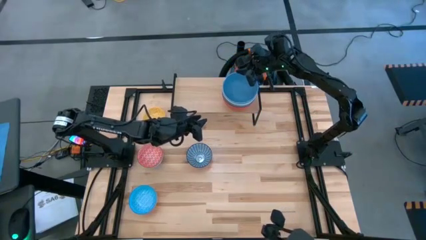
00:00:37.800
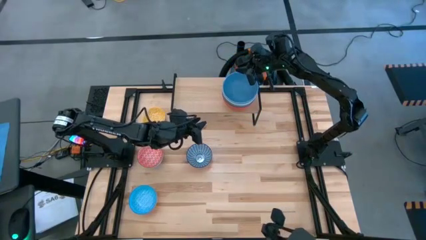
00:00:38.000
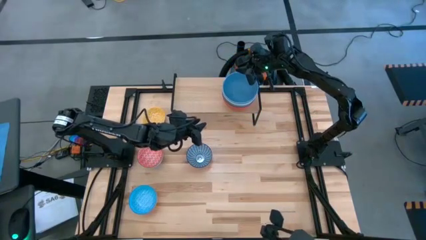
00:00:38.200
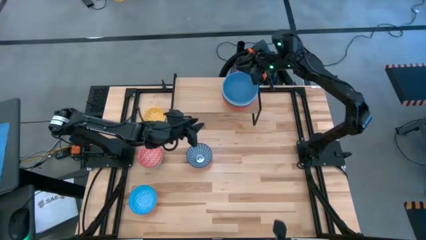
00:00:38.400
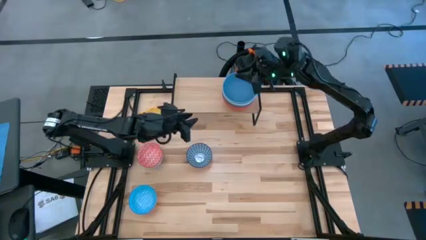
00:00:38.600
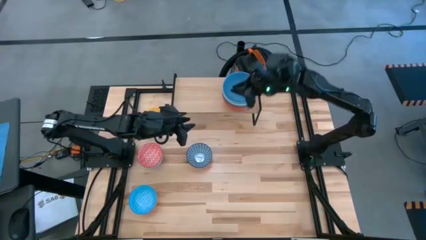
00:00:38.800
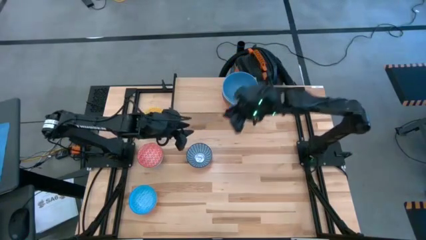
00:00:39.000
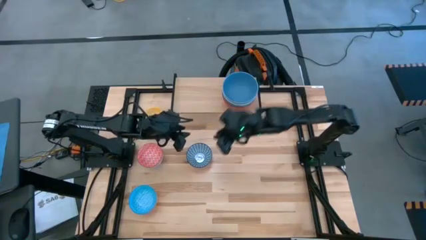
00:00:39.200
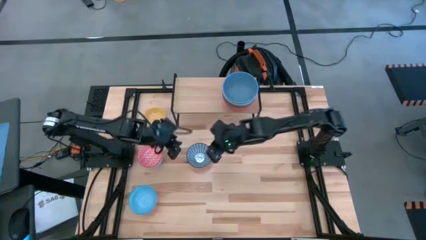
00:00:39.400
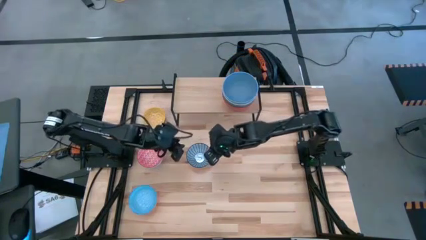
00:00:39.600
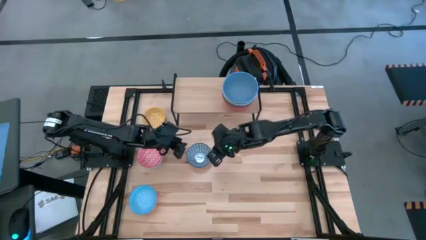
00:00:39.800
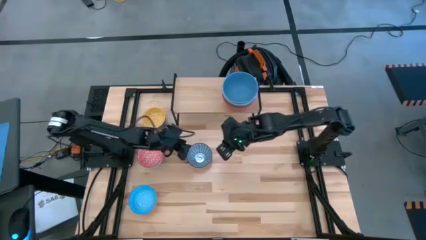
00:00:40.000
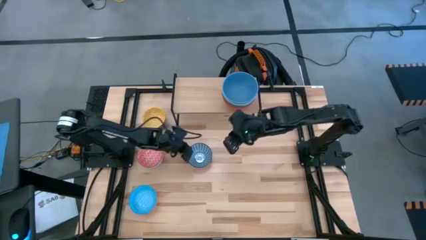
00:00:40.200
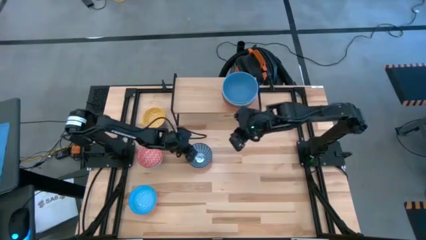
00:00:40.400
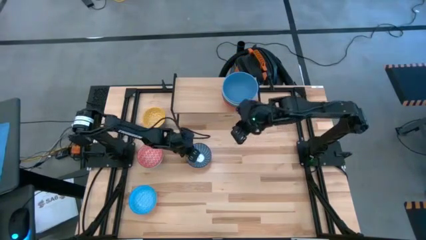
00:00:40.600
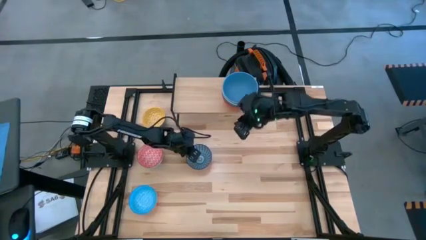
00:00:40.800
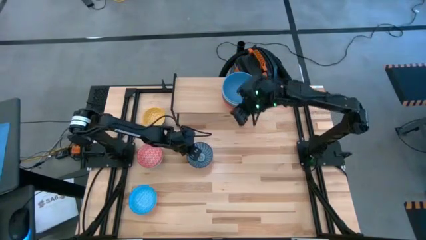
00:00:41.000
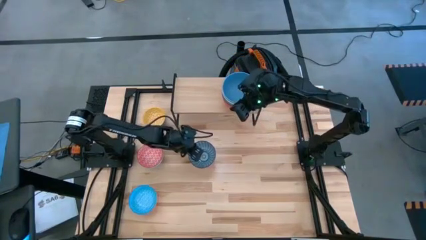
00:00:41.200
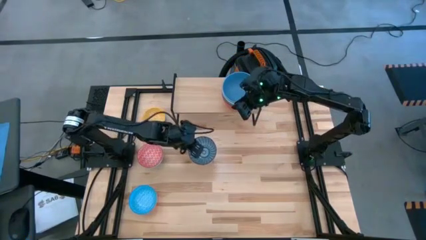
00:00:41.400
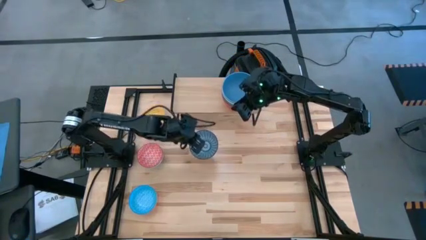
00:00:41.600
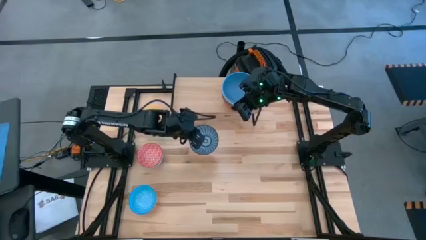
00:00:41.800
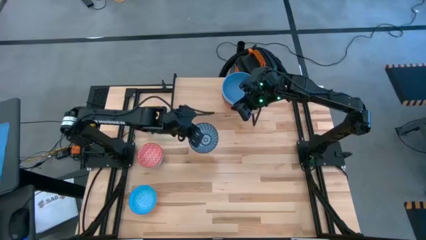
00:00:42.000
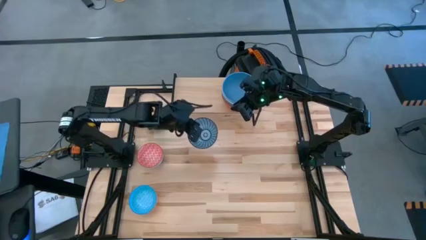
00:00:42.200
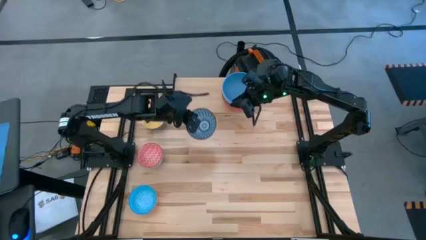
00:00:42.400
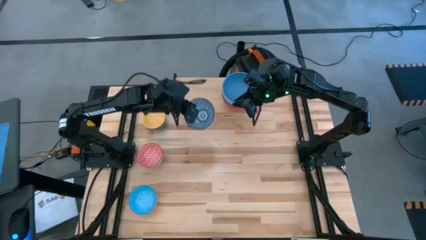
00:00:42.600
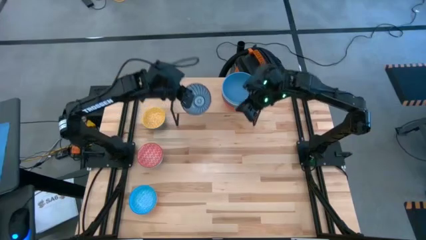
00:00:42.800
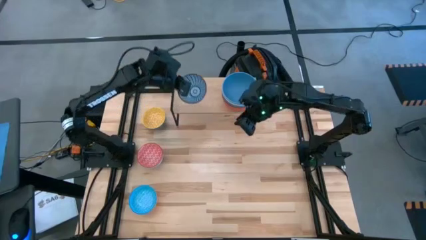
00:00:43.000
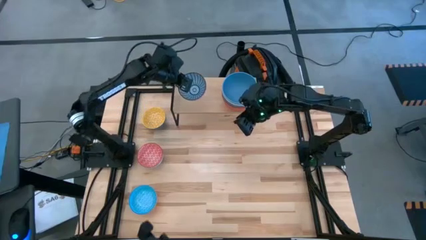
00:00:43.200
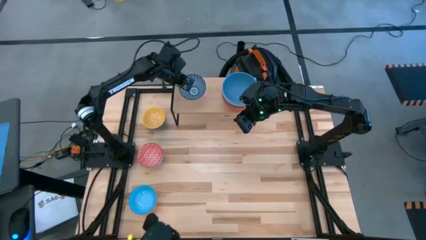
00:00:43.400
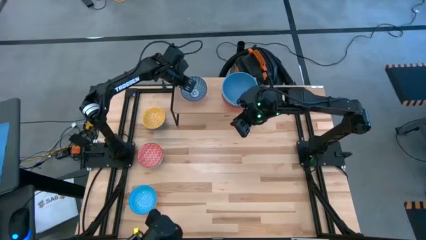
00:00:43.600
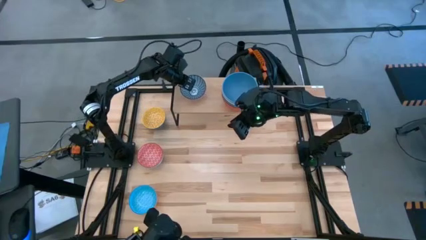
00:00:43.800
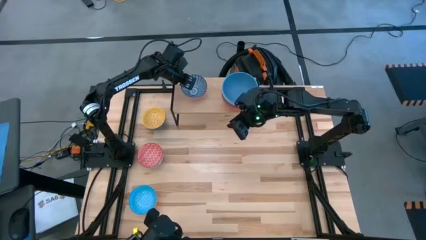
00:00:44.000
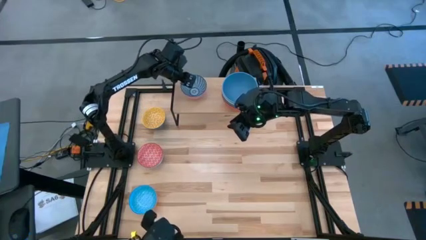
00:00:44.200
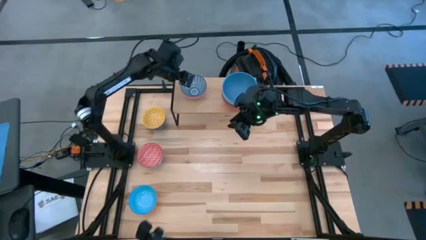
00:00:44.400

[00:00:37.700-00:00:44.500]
Task: Place and stack bowls onto a shelf
Put the red-blue patterned bowl on the shelf

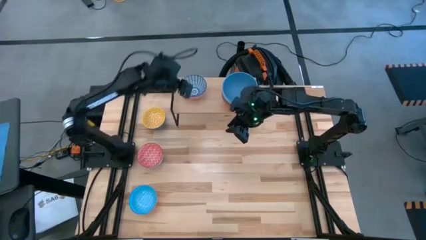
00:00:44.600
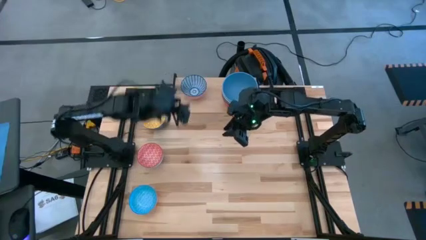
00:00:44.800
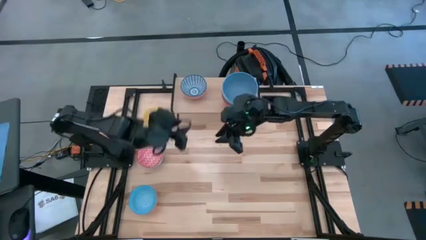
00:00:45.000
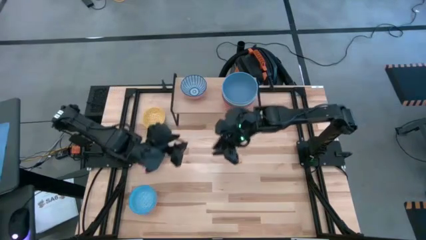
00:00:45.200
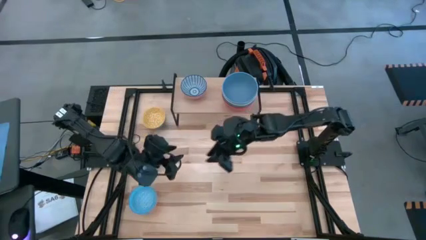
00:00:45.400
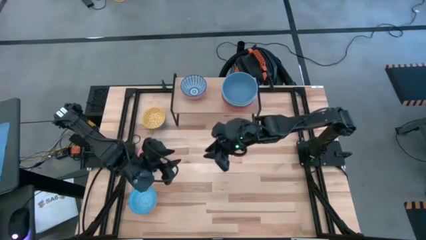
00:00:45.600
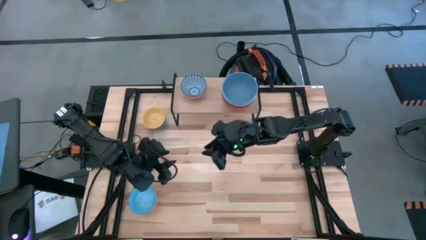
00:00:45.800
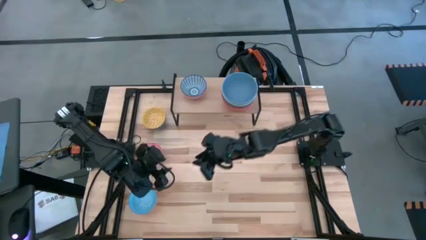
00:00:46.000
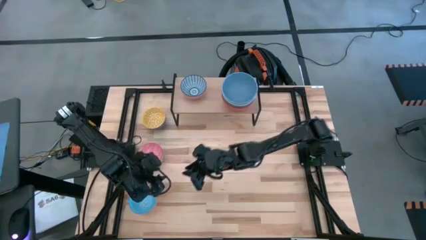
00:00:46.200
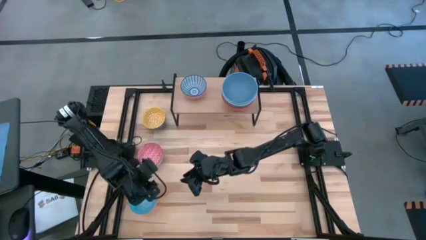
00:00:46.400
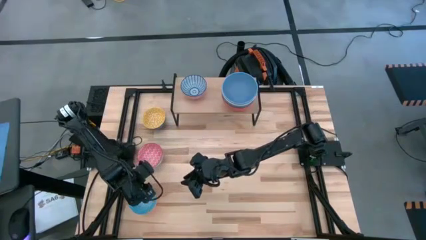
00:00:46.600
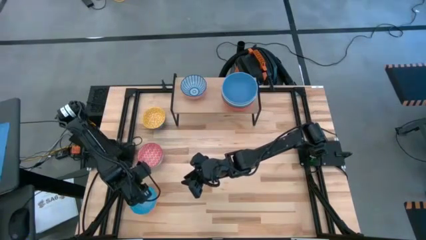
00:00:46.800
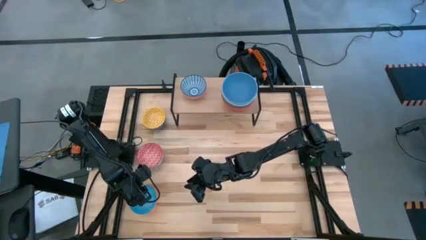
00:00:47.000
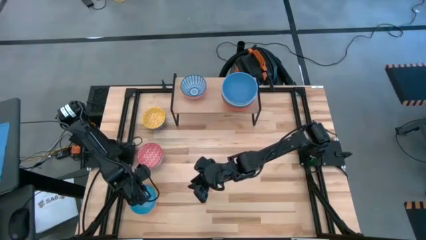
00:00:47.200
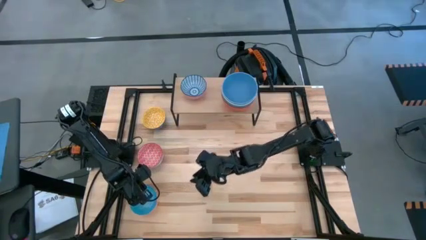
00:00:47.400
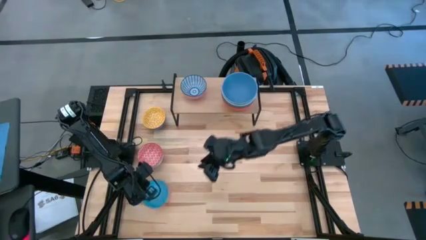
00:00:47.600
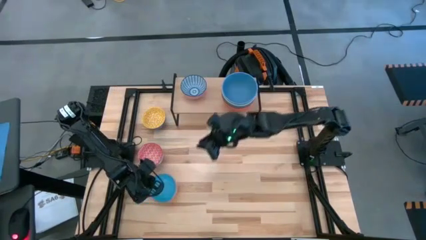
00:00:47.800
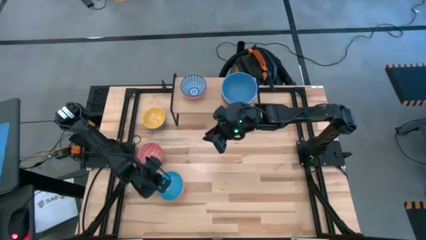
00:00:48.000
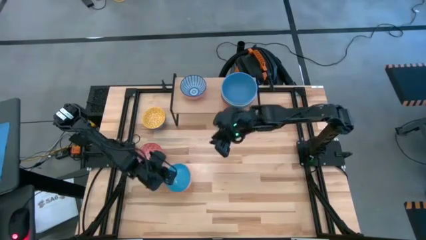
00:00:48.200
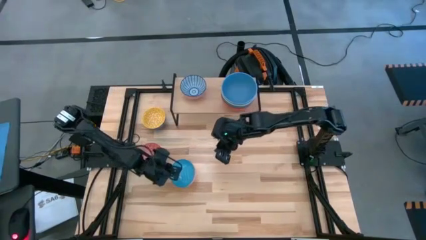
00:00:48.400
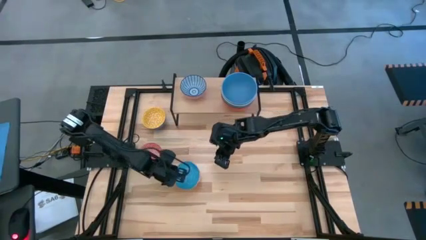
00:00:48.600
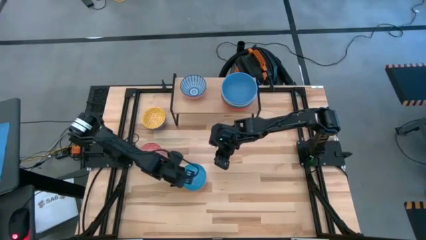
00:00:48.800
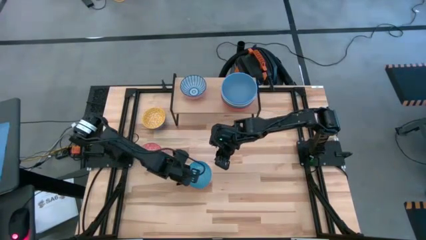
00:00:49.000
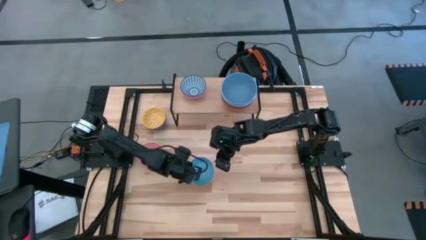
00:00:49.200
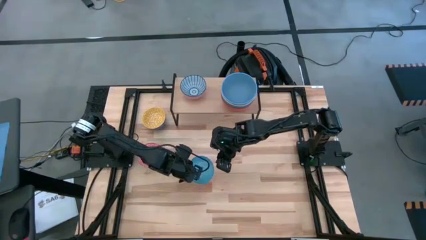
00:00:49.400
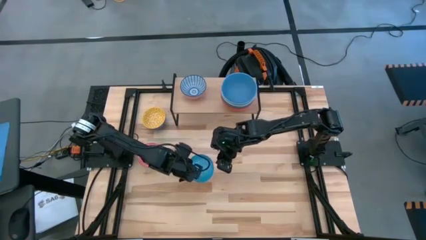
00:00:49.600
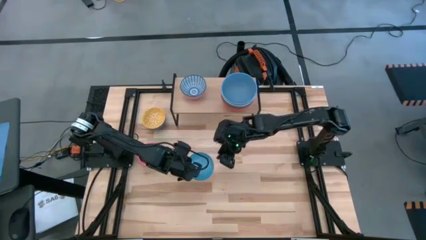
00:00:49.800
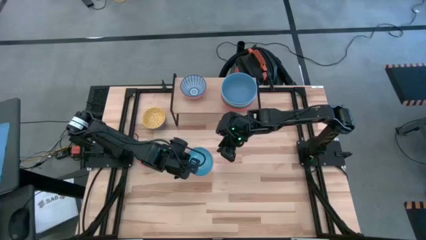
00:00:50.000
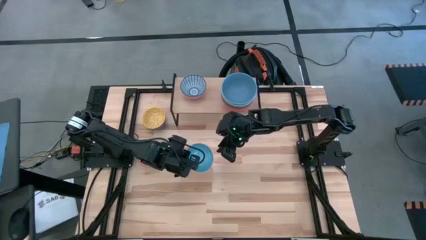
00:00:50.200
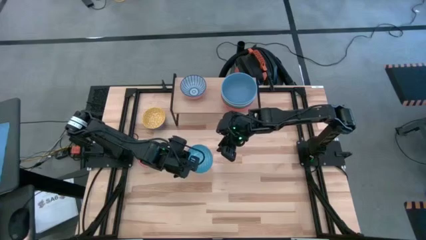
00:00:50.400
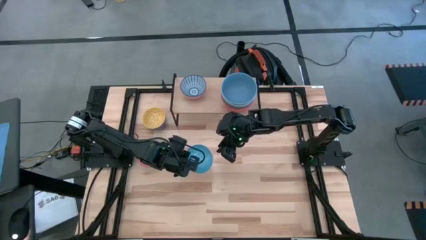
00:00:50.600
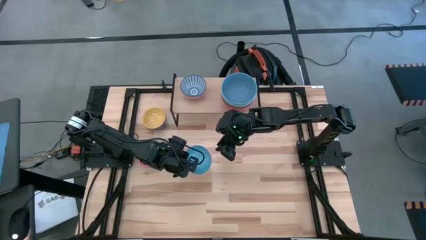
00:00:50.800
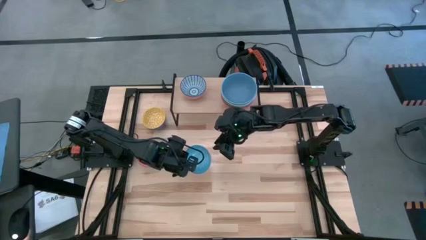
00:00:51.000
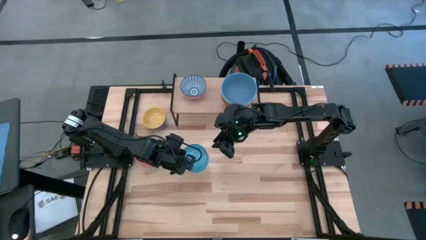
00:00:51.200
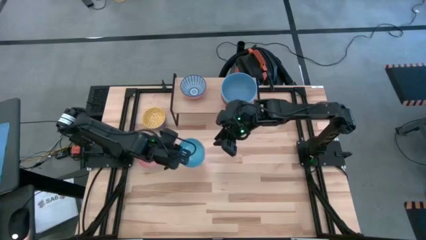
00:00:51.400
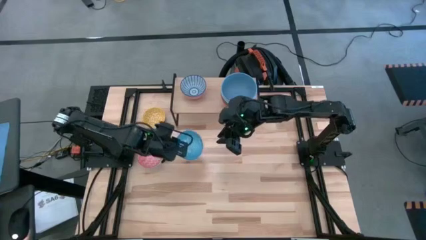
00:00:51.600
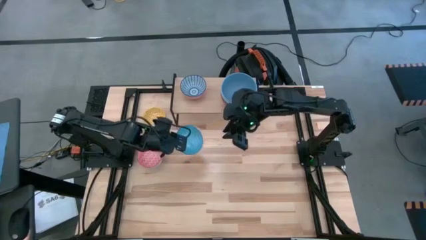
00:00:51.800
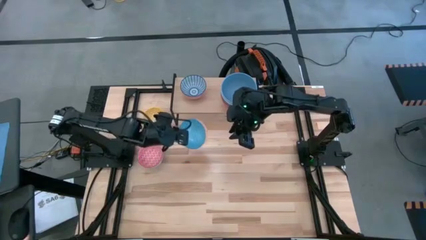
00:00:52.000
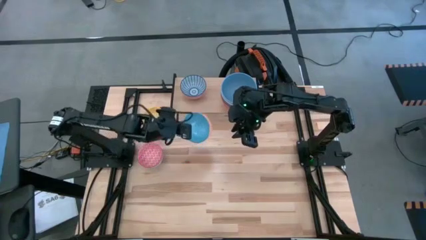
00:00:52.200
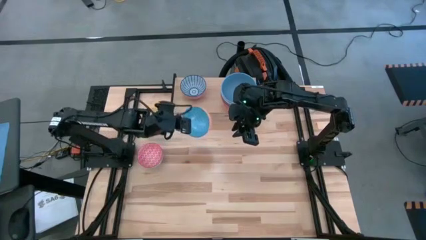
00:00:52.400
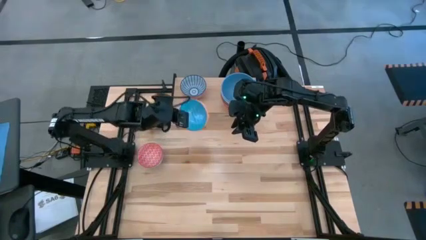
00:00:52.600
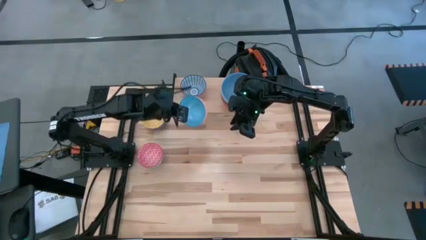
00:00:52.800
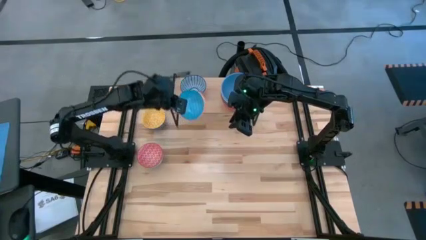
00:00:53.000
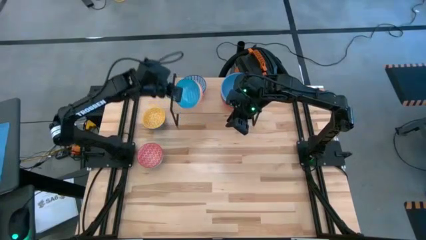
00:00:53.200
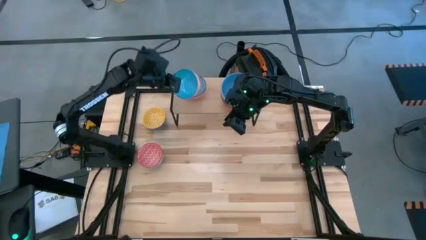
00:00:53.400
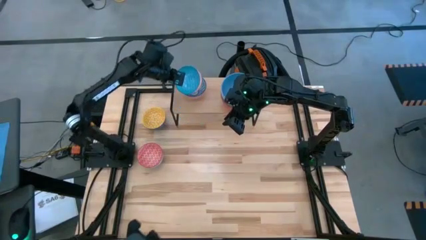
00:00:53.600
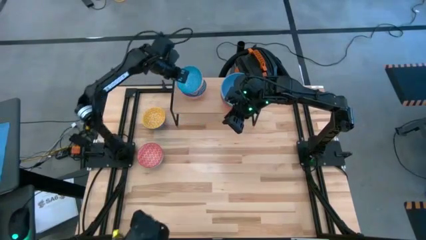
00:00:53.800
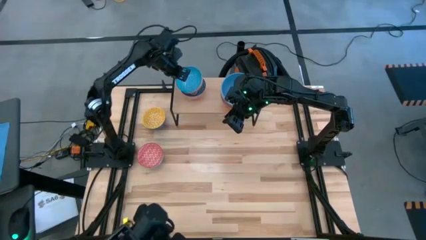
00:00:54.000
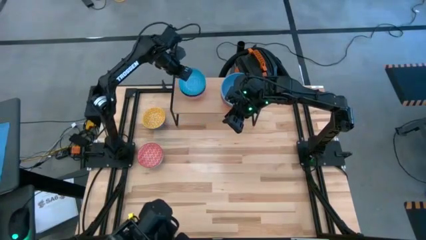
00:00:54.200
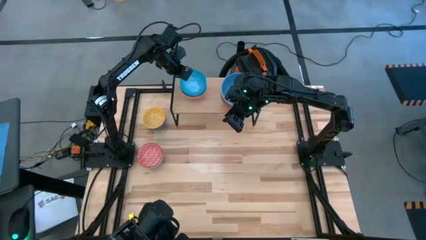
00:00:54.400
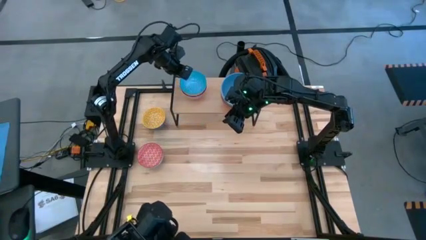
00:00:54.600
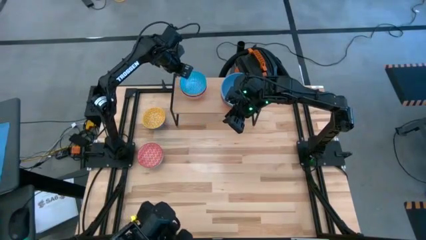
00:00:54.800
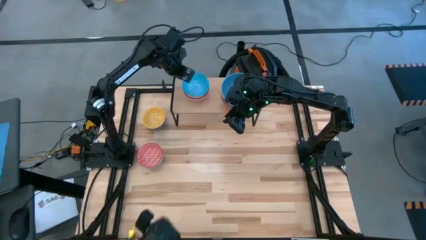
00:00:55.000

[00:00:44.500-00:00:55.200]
Stack the yellow-blue patterned bowl on top of the red-blue patterned bowl on the shelf

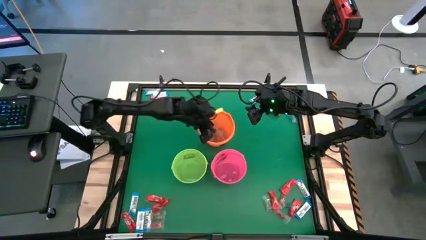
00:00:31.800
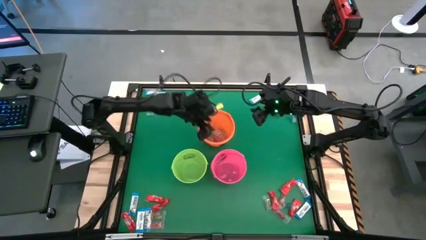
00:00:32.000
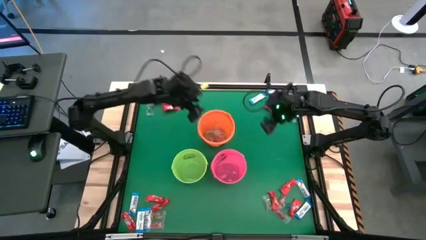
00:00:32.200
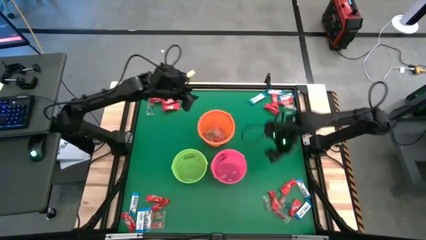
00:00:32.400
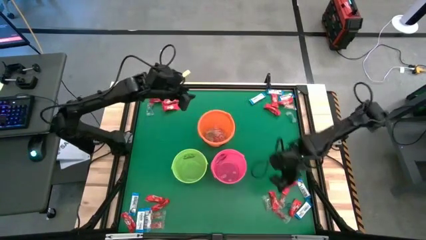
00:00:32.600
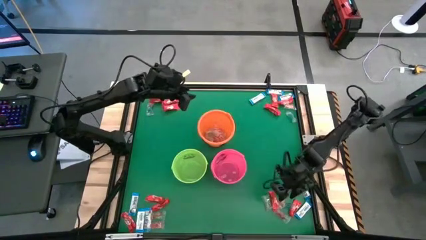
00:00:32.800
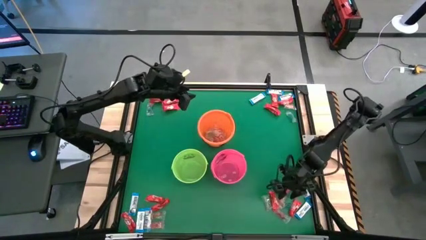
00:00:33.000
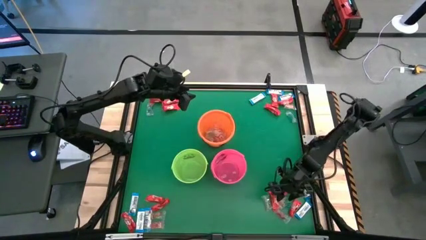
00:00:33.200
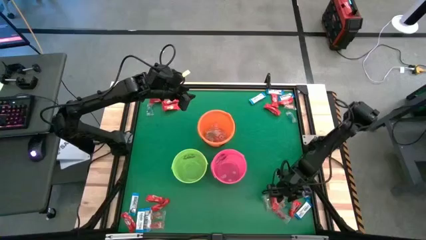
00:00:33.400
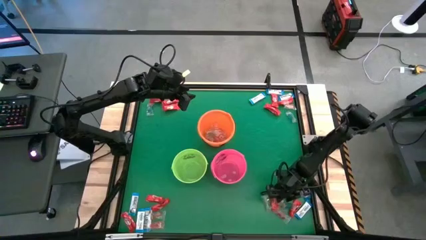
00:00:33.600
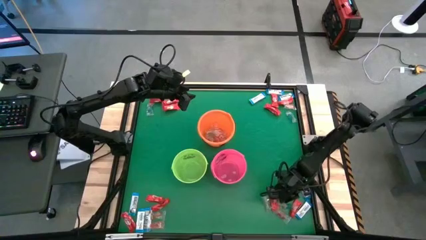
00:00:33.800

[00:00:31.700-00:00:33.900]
Task: Sort candy by brand, put in halloween buckets
Put the orange gummy into the orange bucket
